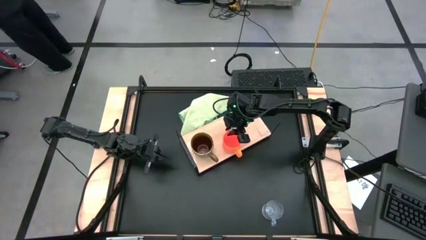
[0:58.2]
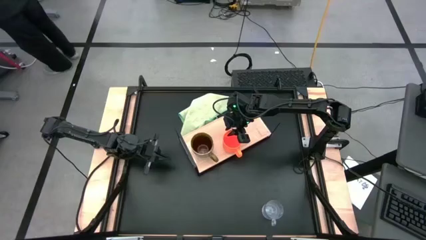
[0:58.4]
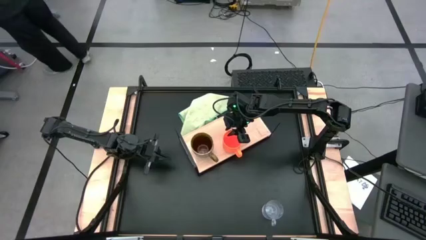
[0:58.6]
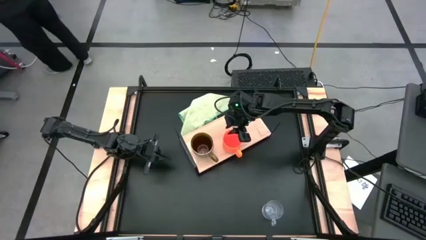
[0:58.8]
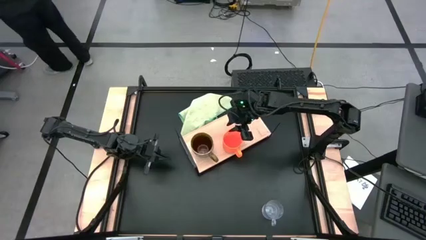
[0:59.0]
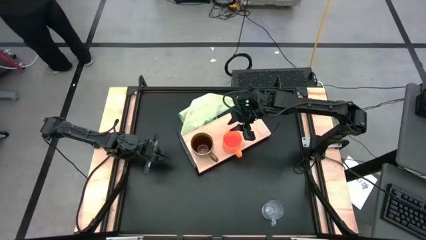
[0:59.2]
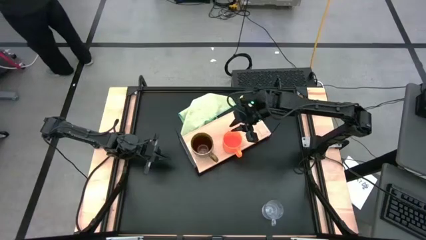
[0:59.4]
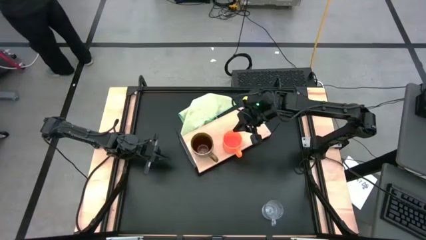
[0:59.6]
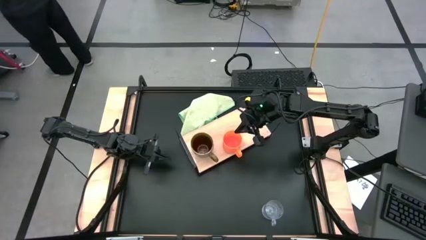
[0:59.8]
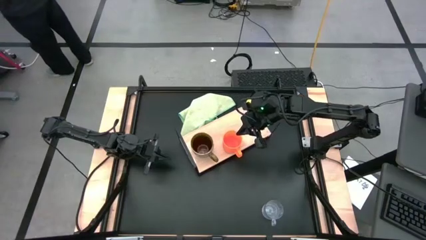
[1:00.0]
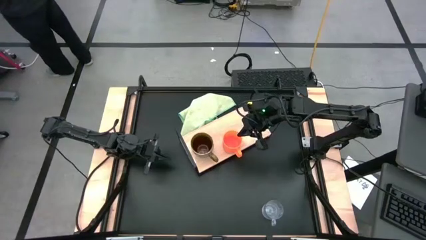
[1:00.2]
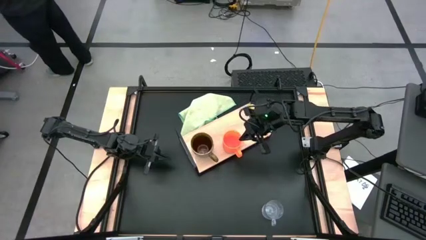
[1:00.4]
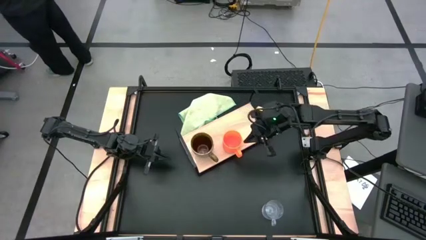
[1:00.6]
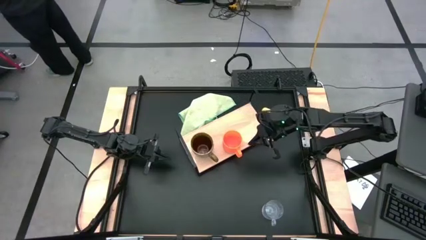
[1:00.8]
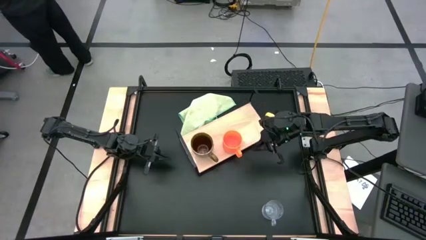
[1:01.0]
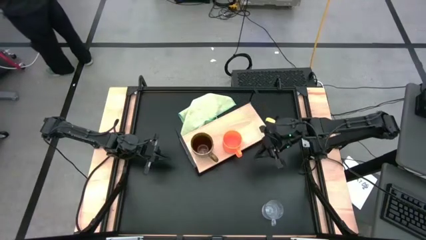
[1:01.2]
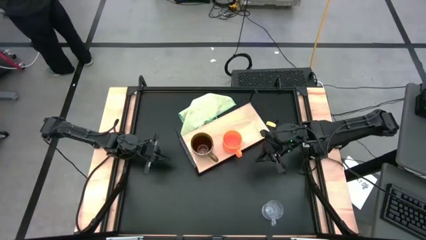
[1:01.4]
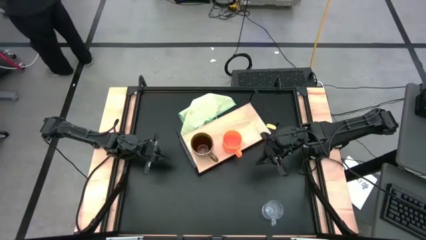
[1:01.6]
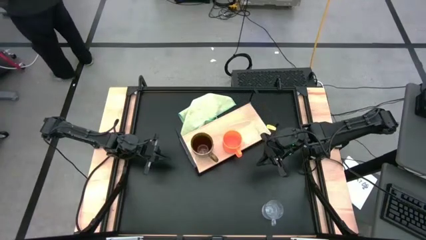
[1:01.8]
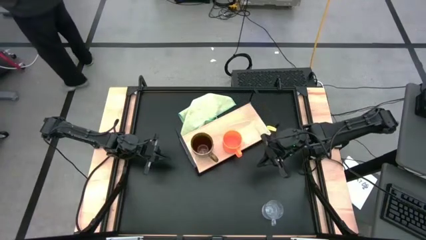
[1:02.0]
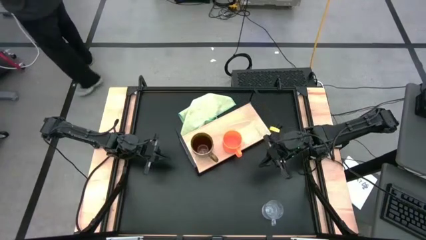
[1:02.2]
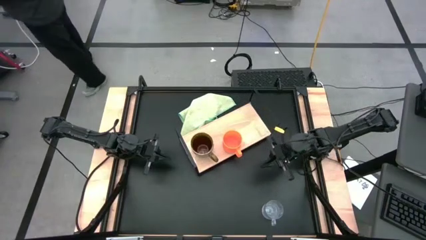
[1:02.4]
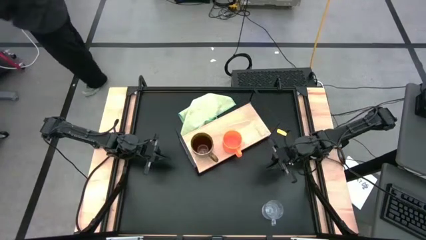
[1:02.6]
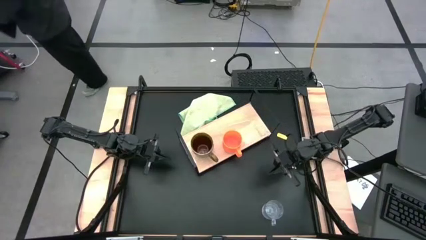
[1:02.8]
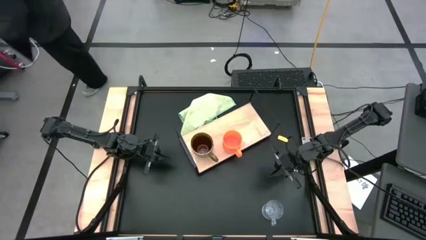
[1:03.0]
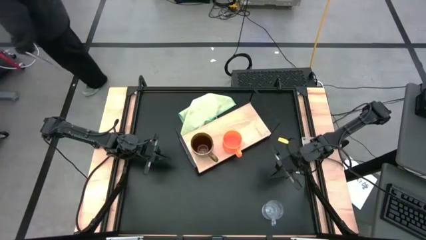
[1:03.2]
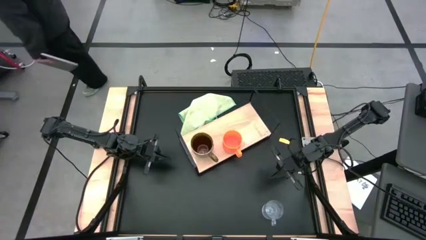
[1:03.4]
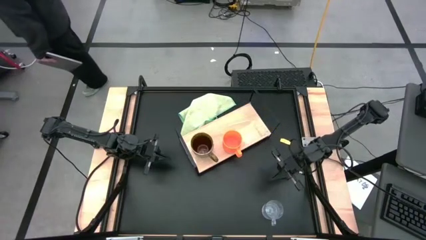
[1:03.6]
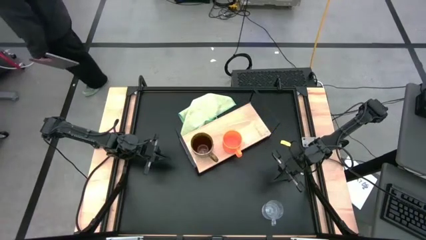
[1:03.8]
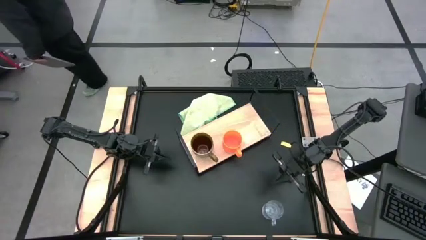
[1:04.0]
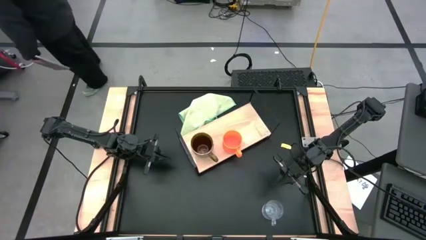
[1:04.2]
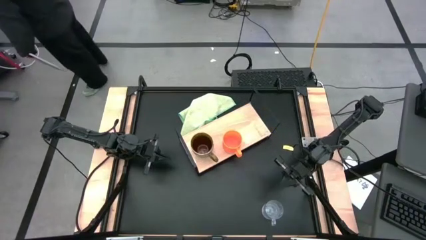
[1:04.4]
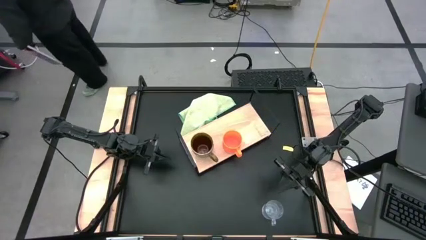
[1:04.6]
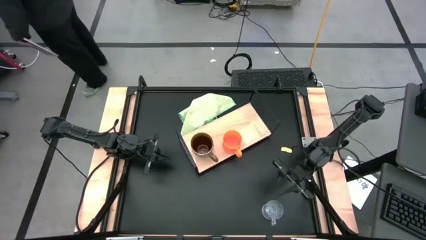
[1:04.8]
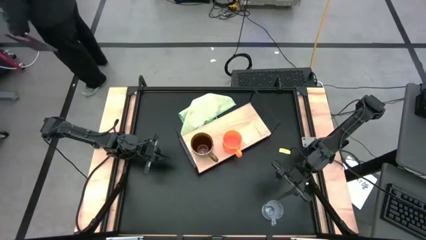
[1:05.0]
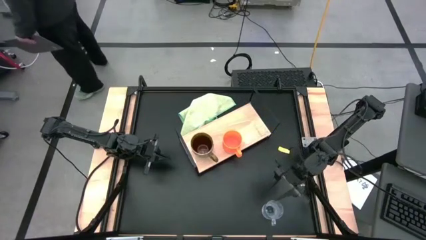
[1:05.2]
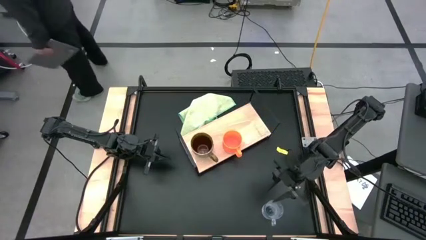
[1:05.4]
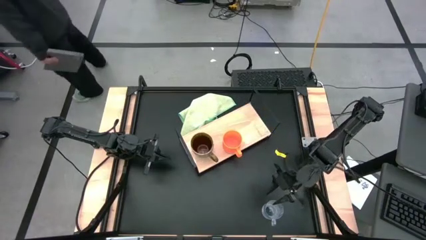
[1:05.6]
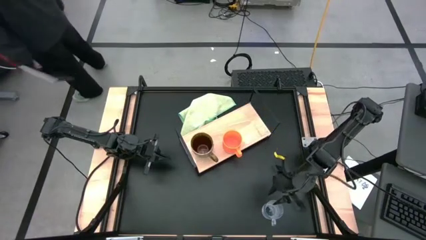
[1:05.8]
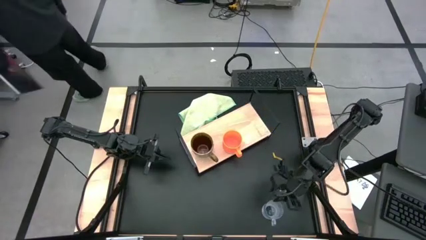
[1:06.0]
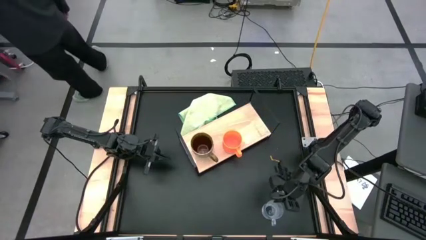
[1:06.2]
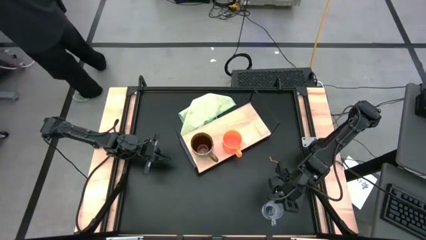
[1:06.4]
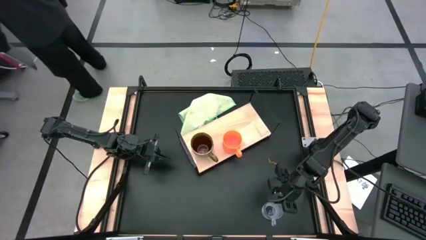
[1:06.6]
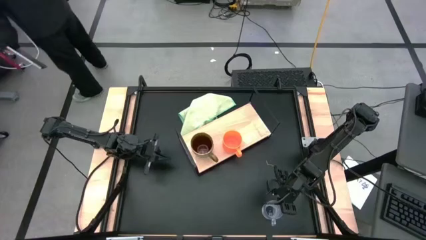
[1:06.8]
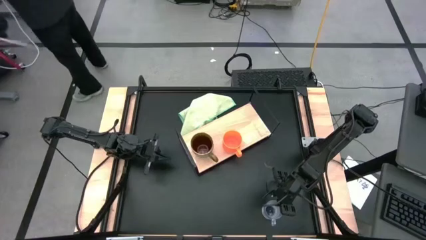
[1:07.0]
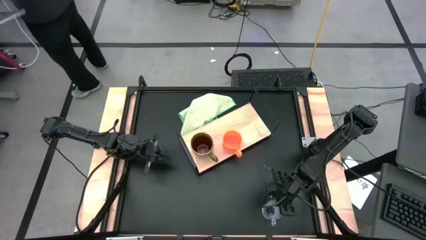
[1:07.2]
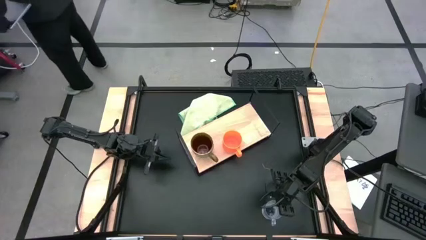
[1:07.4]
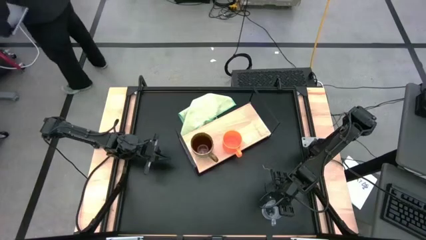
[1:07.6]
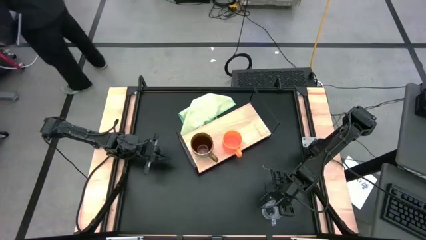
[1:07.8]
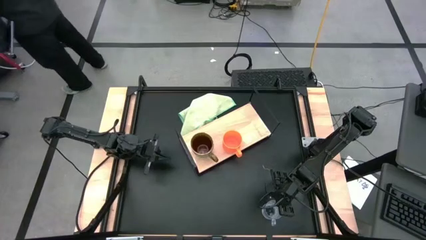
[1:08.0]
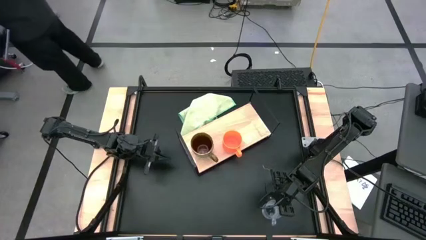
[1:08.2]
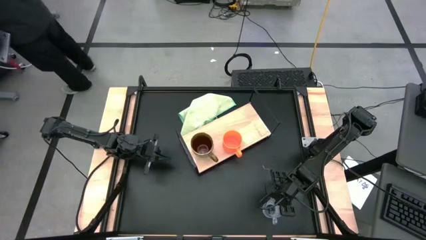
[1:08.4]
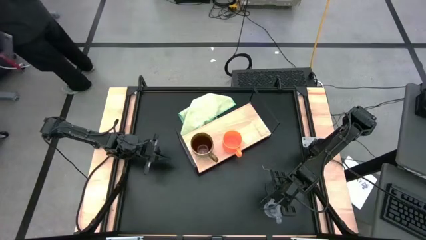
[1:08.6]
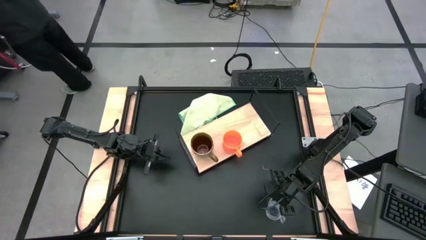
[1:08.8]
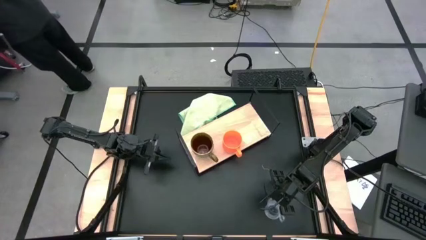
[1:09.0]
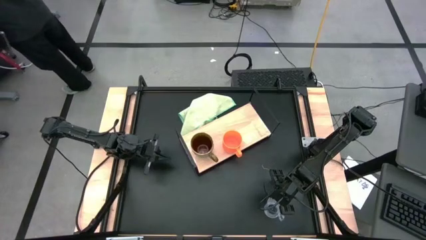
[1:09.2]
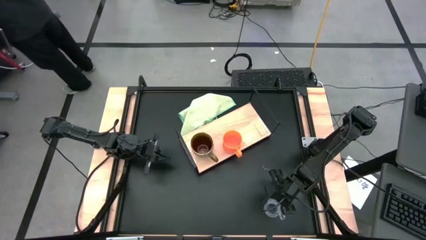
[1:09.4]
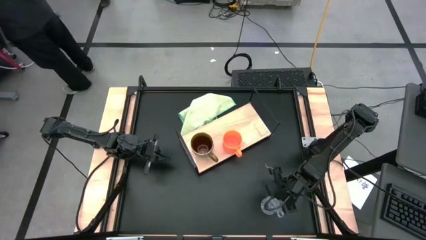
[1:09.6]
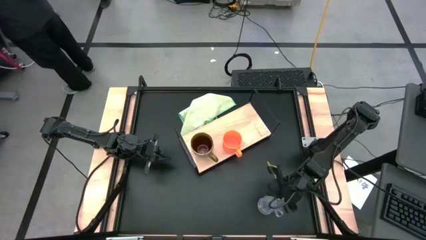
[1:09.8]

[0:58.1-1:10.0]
Task: Stack small to large cups/mugs on shelf
Put the transparent mug on the shelf

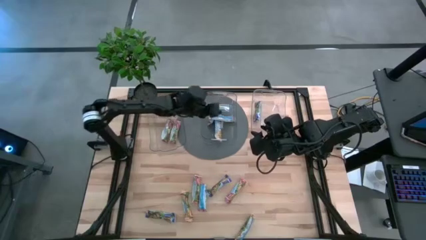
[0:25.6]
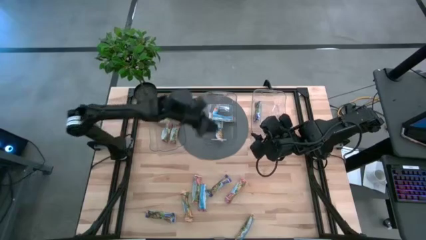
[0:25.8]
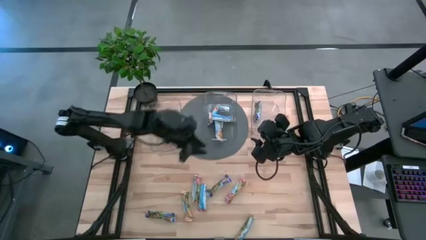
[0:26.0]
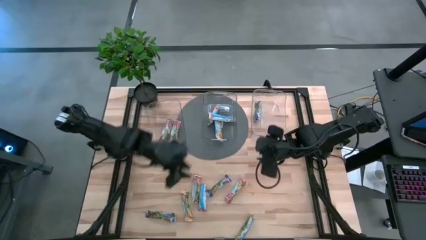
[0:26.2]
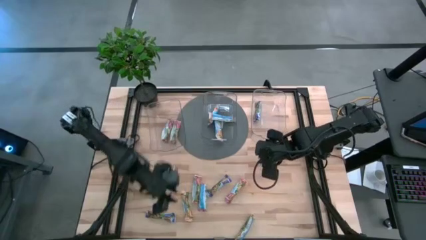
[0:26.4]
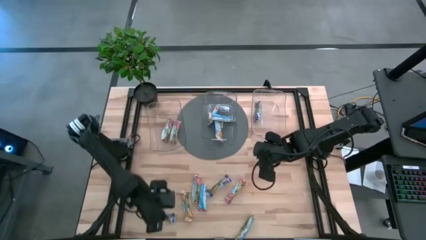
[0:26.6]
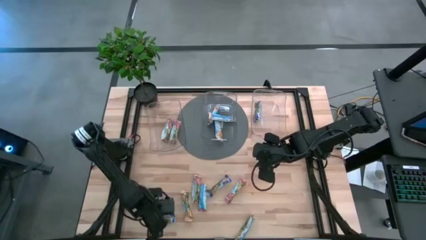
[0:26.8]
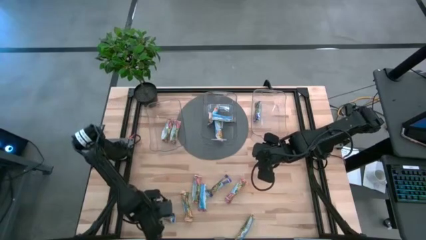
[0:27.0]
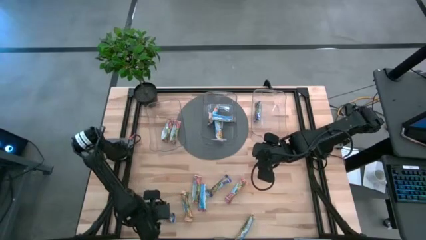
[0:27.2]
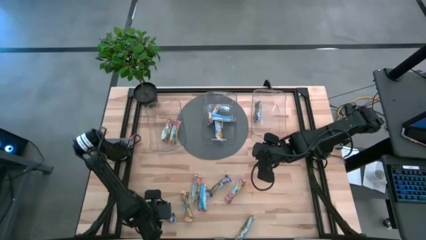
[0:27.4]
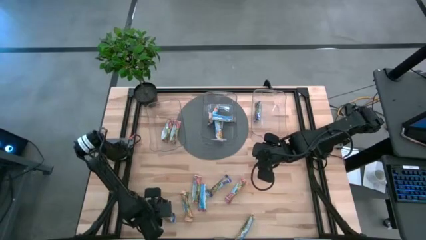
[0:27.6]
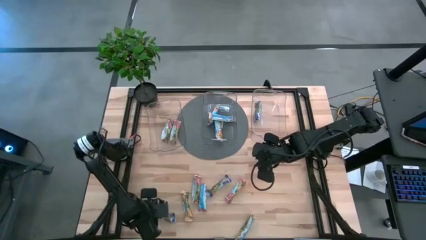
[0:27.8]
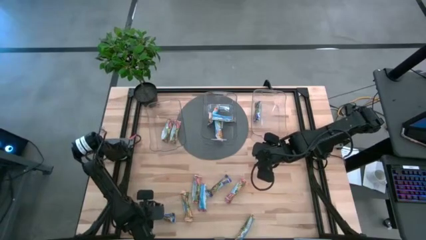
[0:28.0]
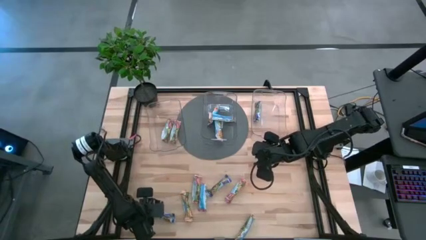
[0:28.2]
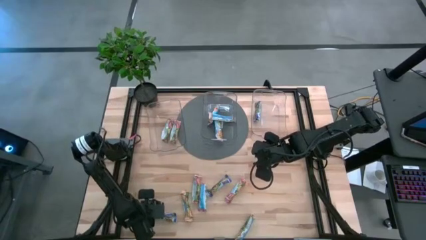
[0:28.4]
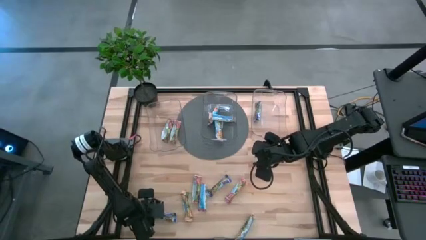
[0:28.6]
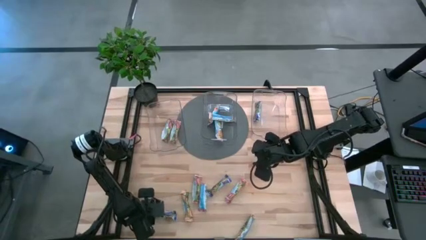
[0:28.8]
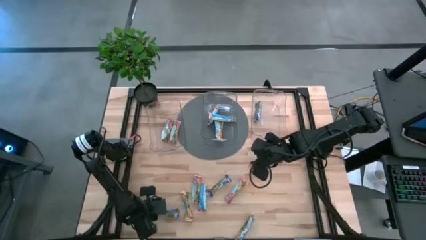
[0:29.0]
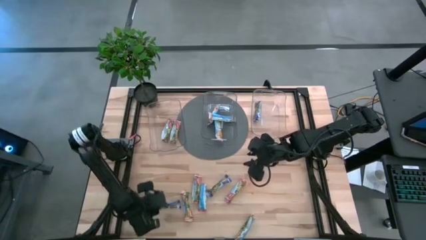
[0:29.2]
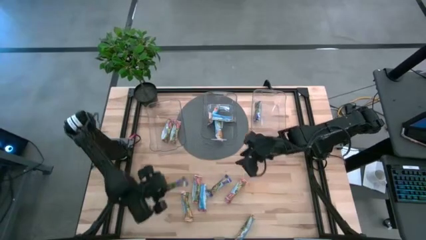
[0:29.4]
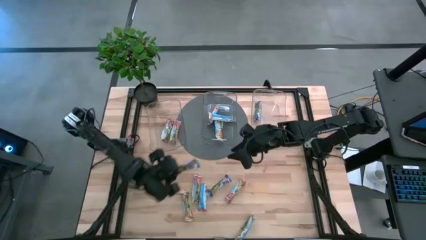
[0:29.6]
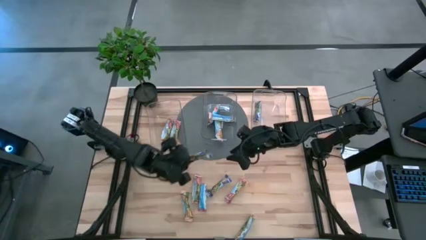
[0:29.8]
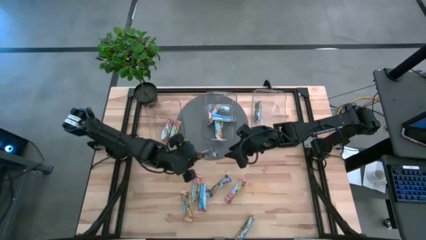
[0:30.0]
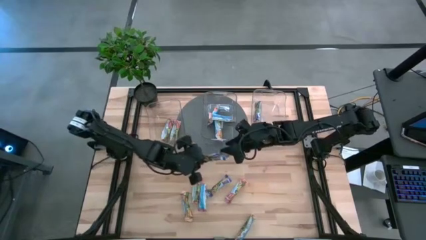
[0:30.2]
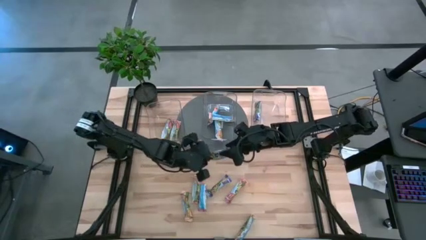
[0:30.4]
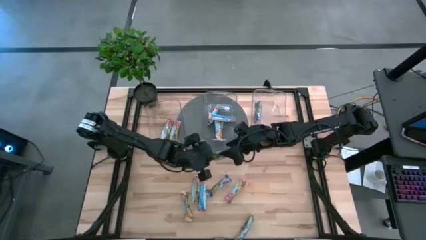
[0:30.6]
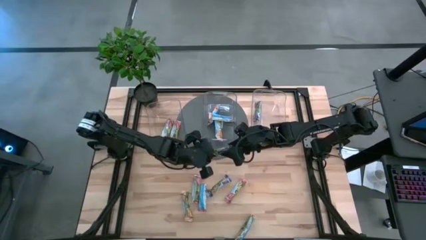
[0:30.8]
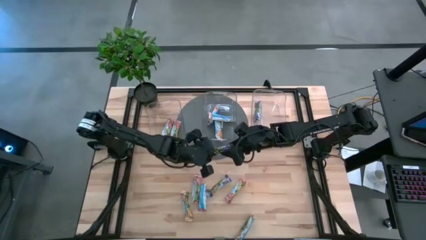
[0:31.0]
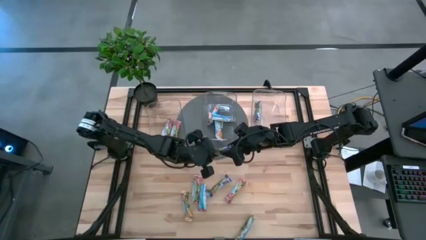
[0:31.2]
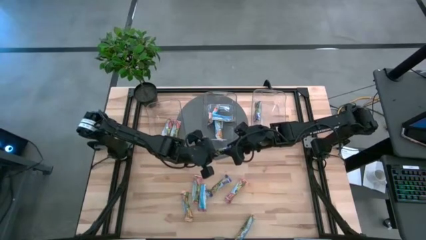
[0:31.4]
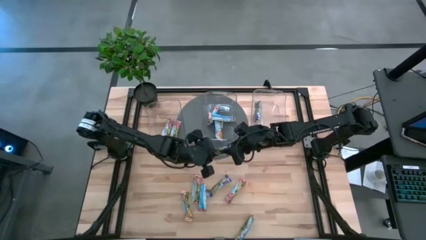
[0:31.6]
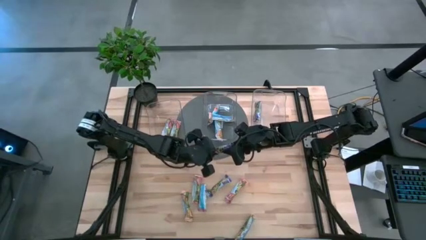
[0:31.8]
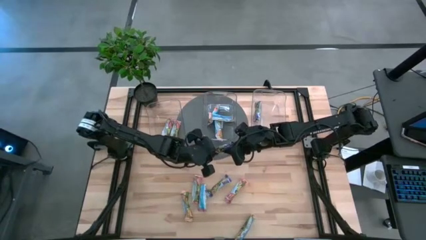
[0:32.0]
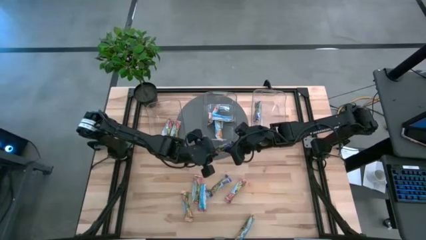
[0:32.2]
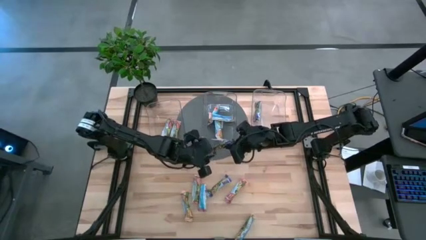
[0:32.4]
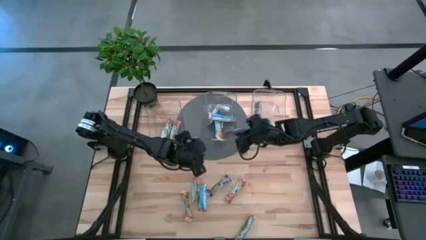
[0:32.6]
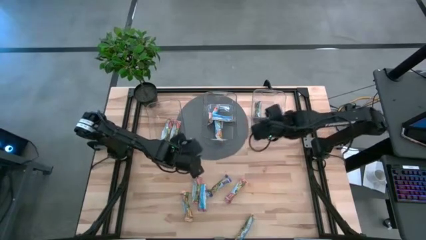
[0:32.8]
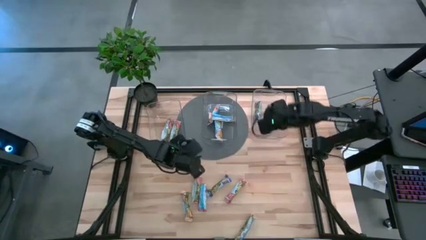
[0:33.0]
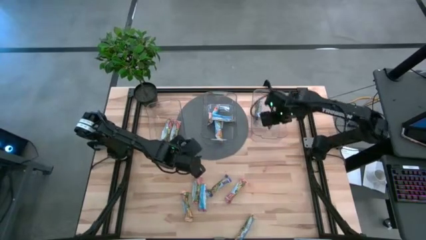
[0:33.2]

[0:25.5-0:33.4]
Task: Pick and place Granola Bars by type
Put the blue granola bar into the right transparent bin
